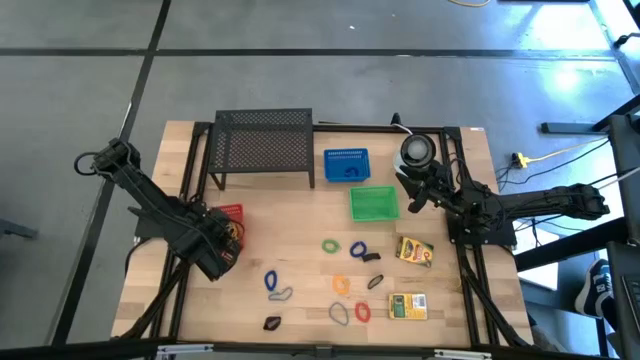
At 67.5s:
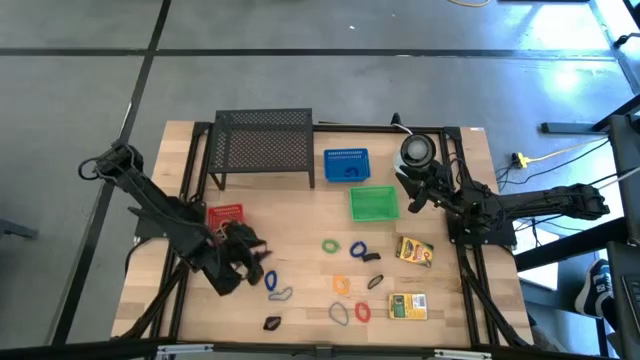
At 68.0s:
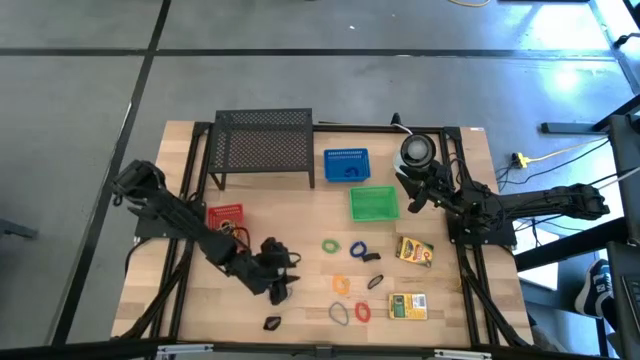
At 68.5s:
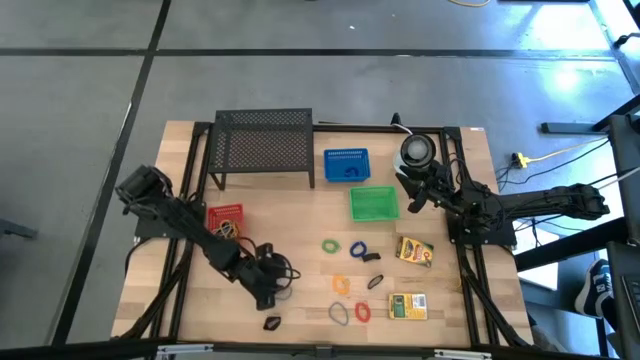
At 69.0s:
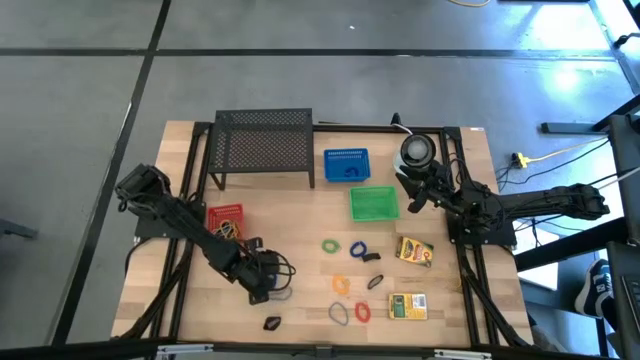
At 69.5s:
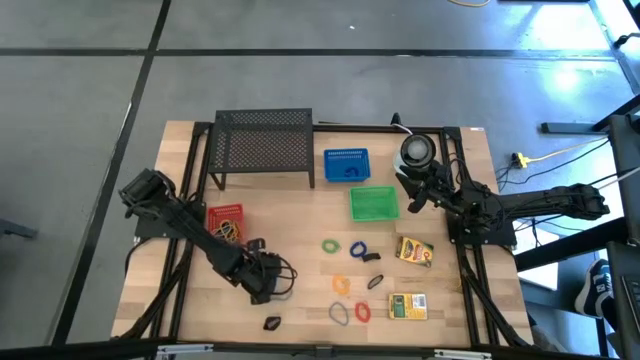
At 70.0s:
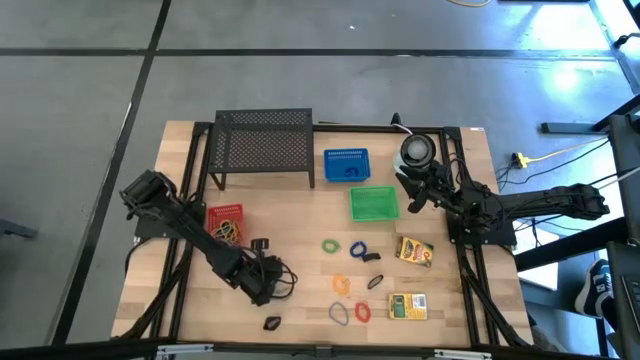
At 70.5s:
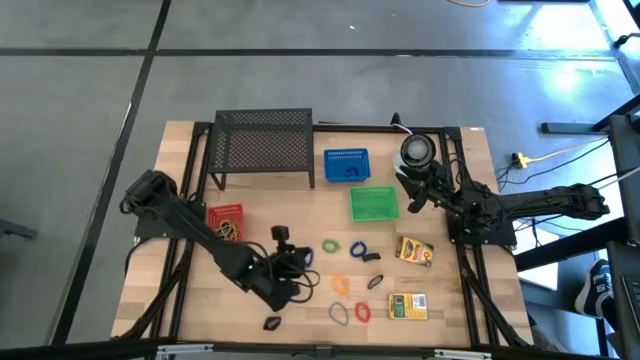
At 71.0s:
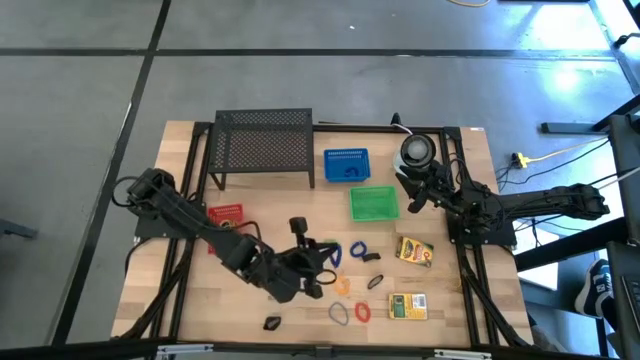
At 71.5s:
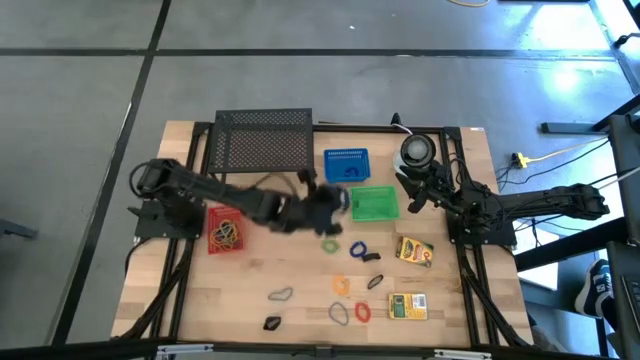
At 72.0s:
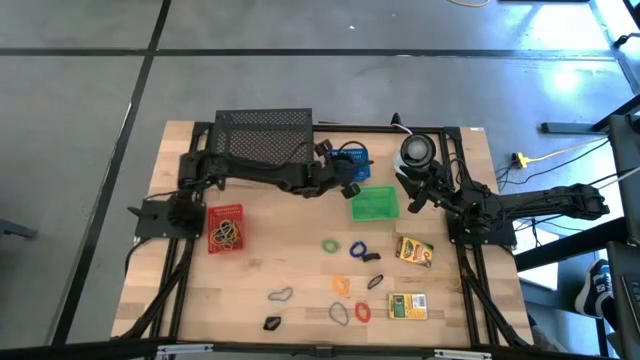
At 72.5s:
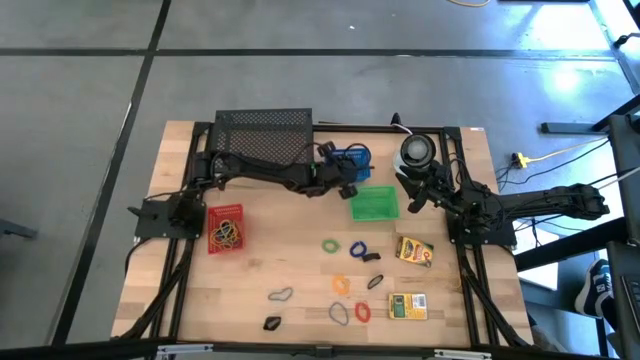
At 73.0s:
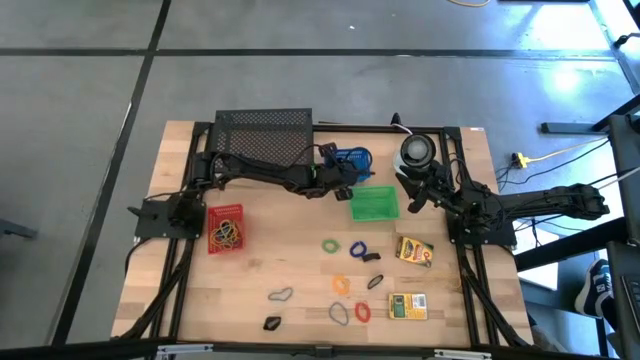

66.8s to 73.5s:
Task: Pick & Place Office Desk Supplies
Put the blue spring keychain into the blue basket

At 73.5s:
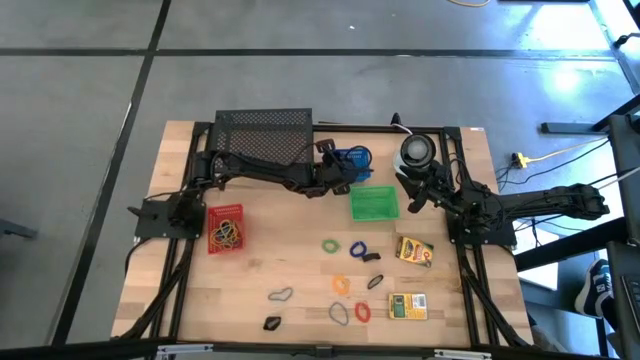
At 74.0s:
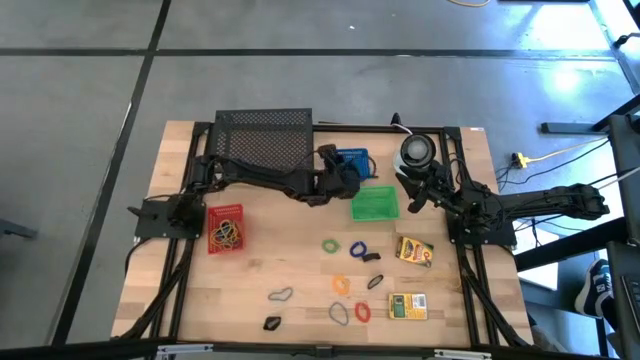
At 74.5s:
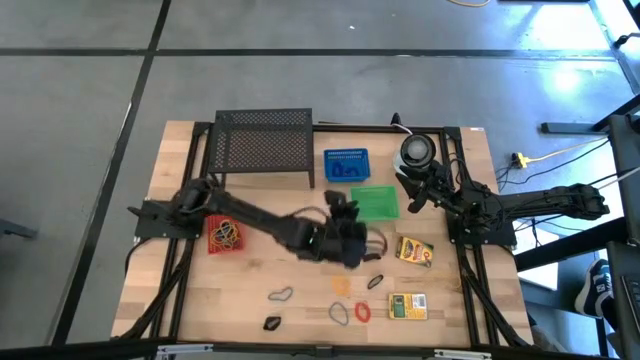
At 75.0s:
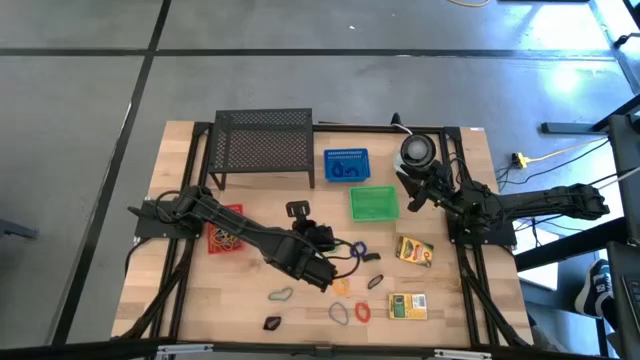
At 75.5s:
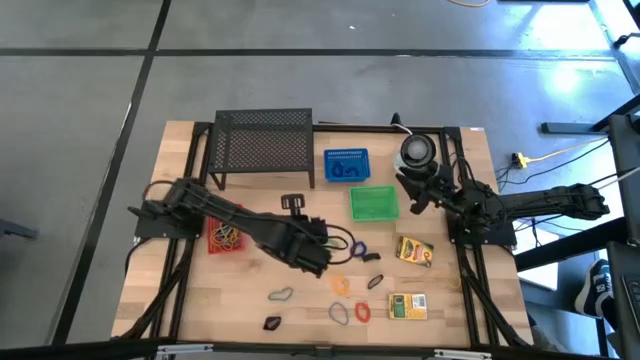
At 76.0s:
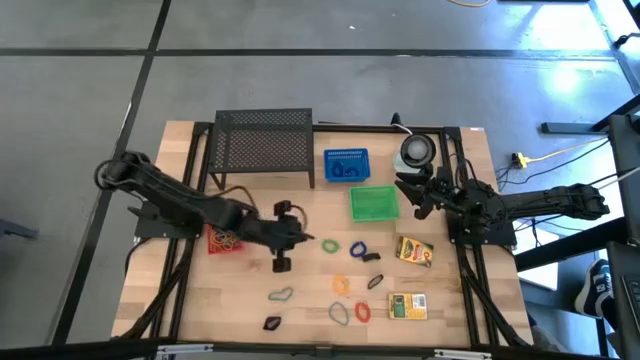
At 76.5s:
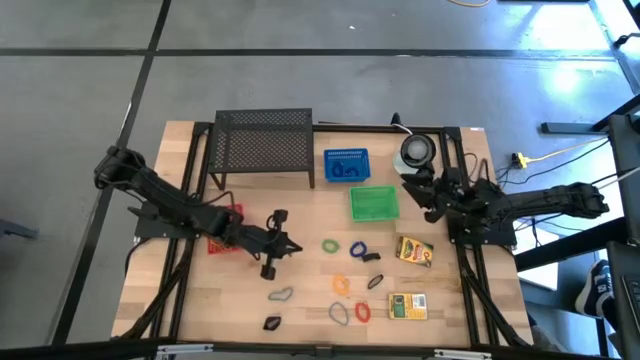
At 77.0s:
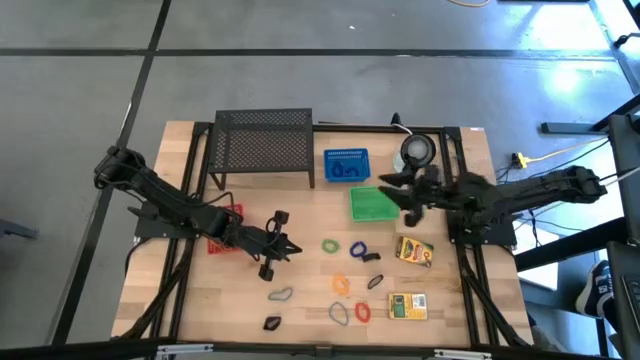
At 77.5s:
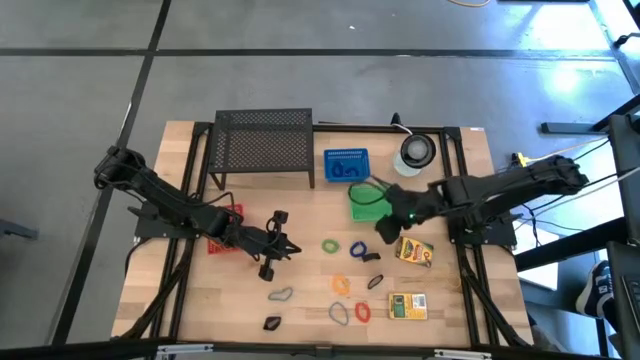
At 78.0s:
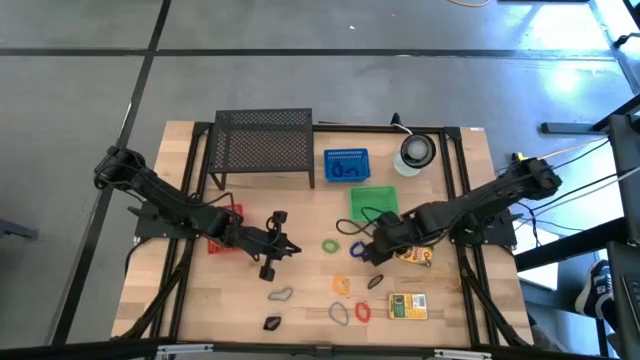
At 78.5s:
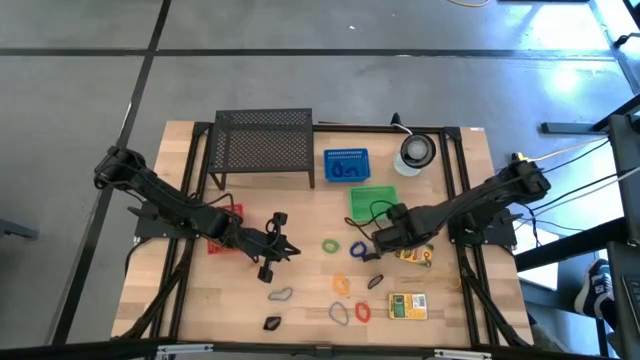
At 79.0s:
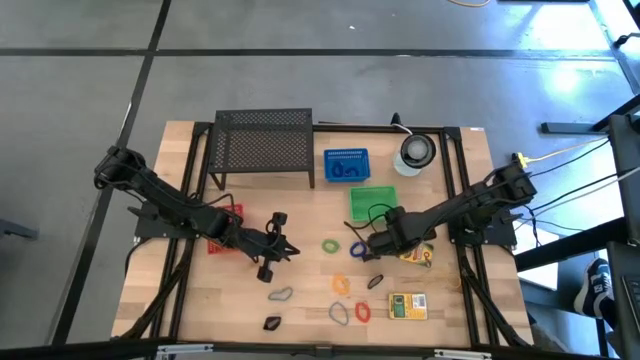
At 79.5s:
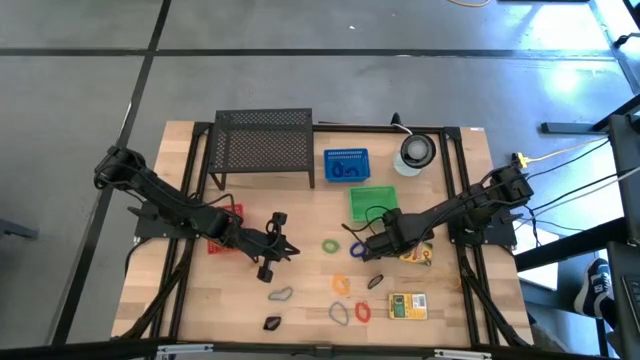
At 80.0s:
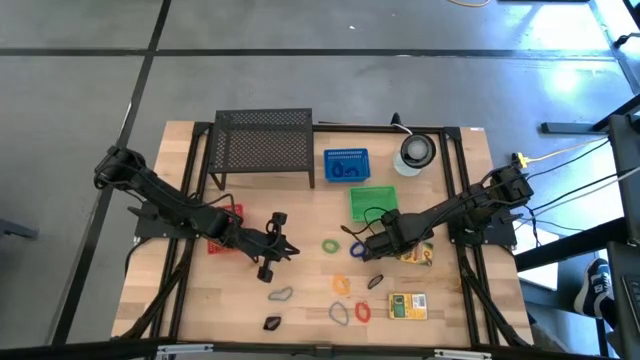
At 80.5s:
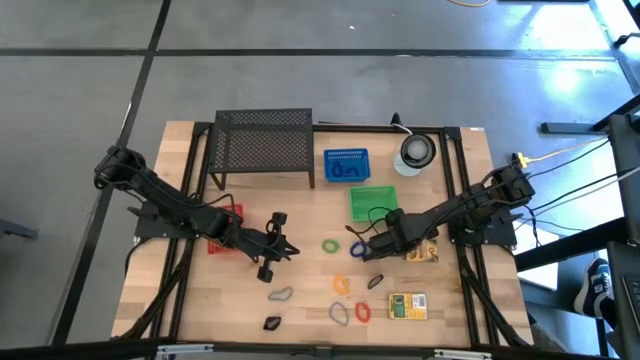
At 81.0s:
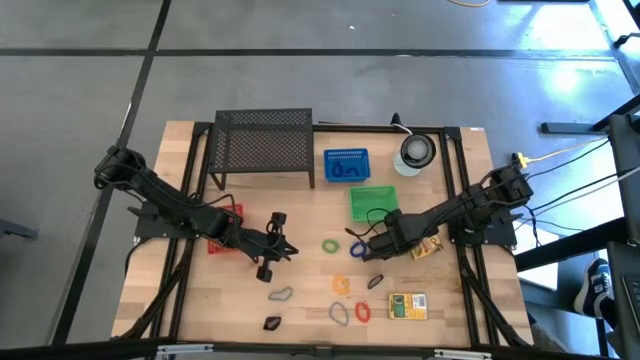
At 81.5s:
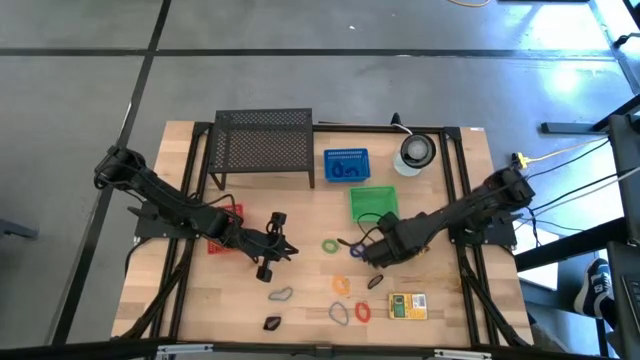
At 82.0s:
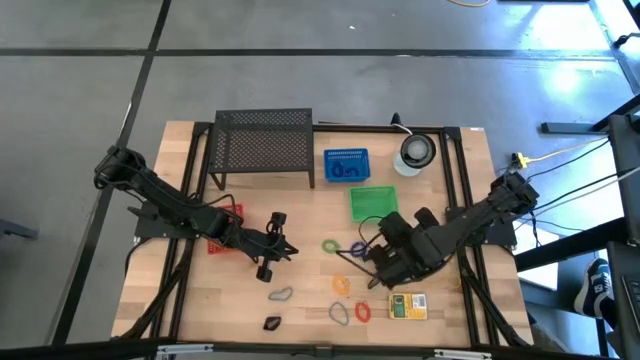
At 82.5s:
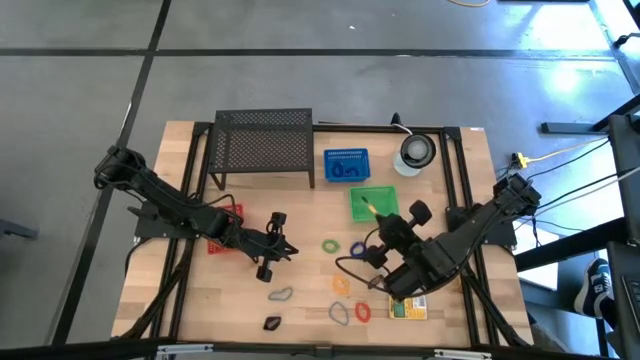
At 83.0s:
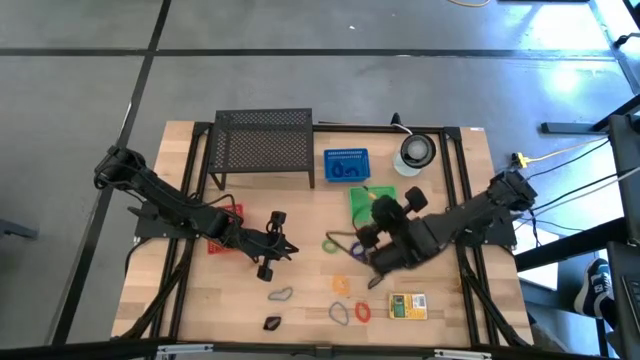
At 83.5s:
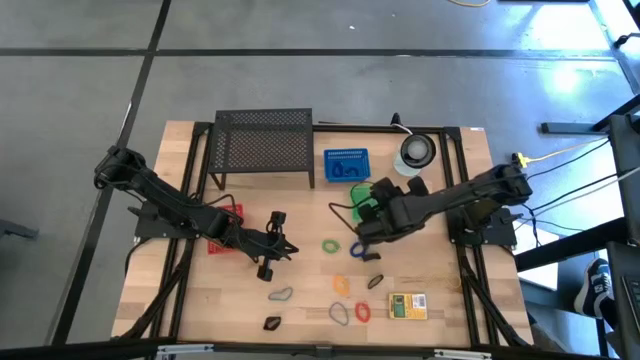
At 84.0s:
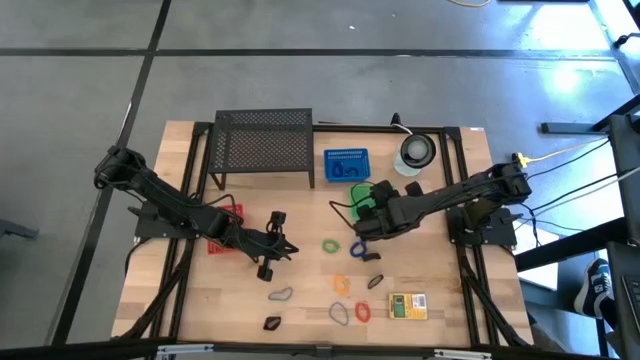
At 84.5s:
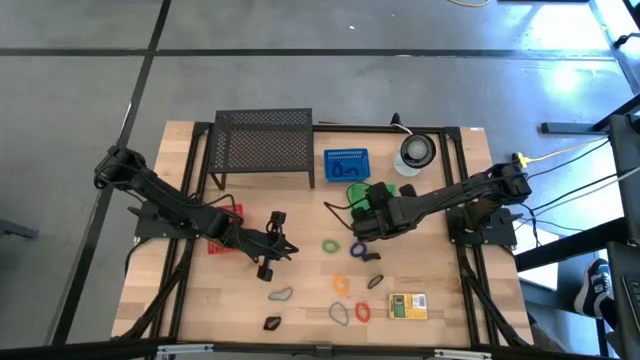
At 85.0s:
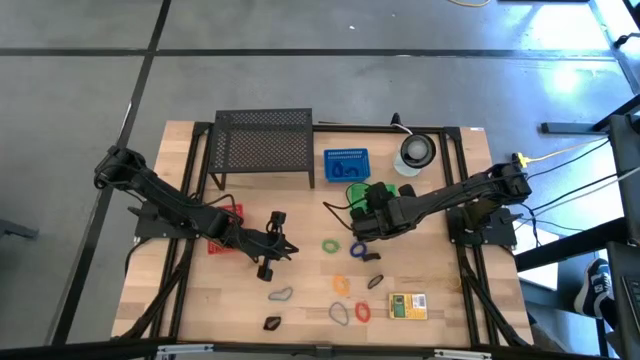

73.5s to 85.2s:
Put the crayon box into the green basket

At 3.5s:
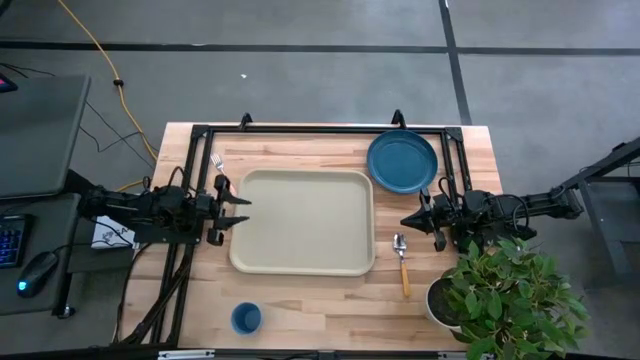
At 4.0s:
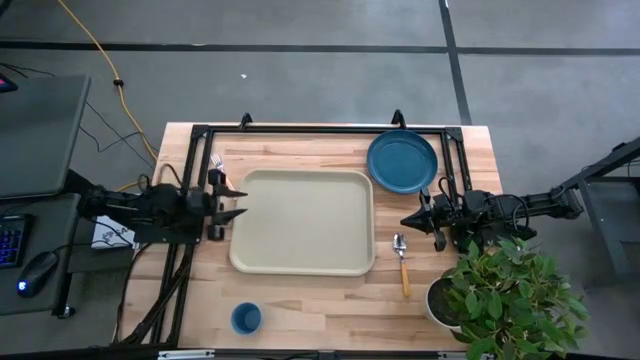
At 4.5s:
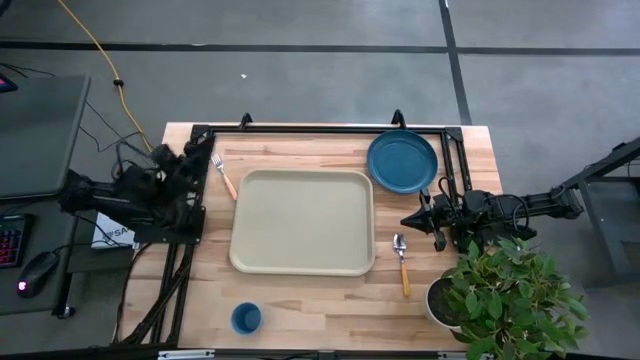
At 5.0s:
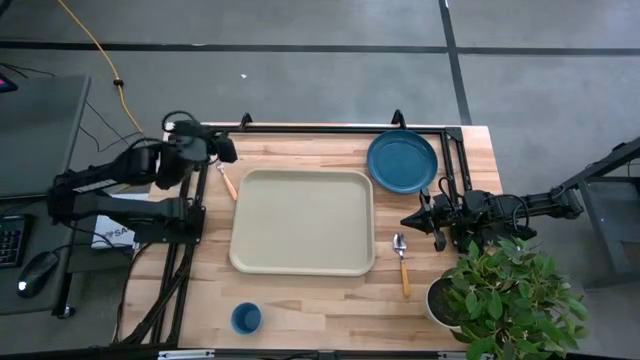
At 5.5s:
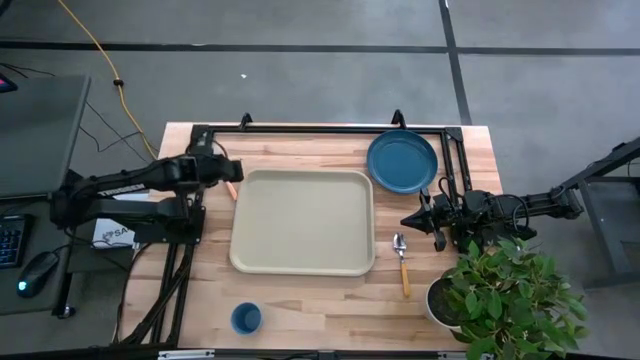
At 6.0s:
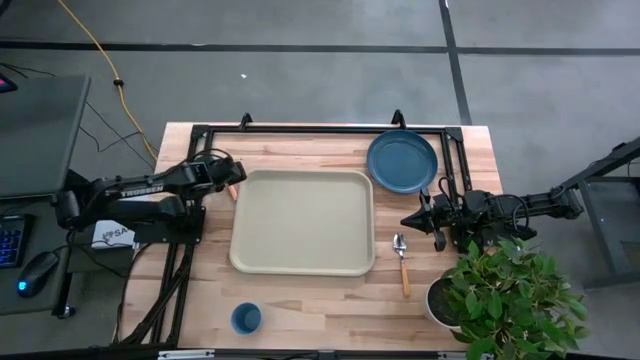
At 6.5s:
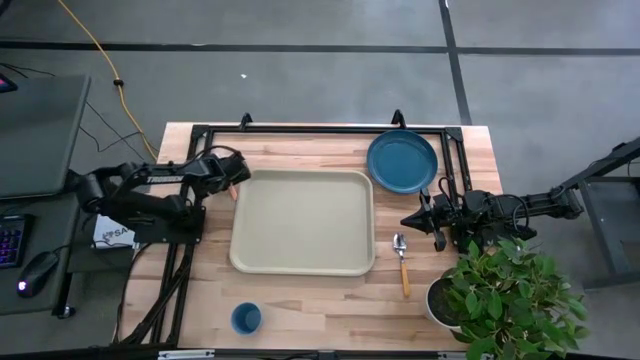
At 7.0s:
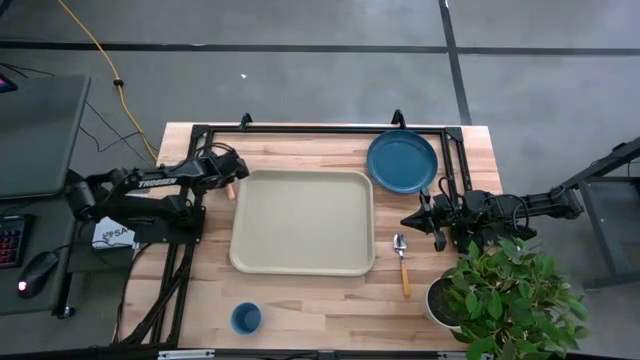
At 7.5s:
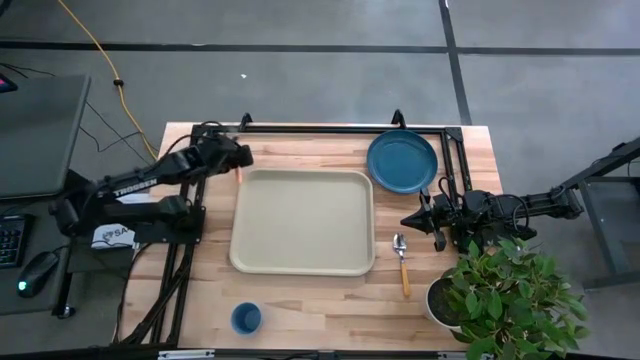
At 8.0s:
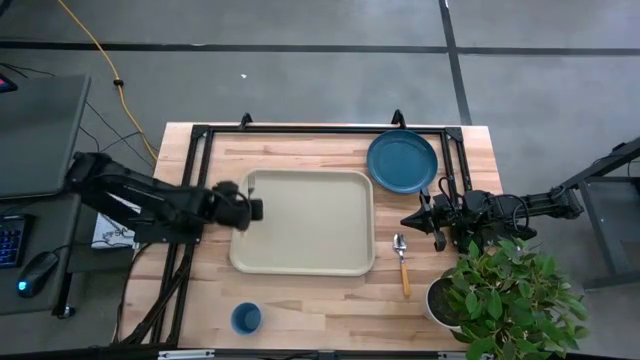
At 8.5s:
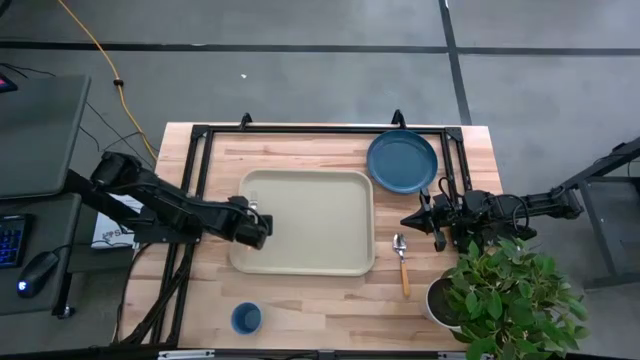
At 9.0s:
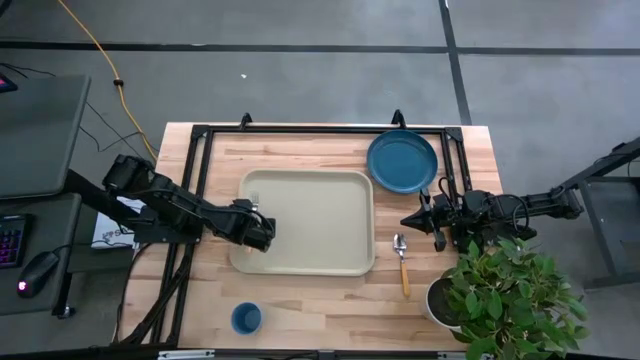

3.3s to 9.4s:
Task: Pick and place plate/cup/fork/spoon on tray
Put the orange fork on the gray serving tray
